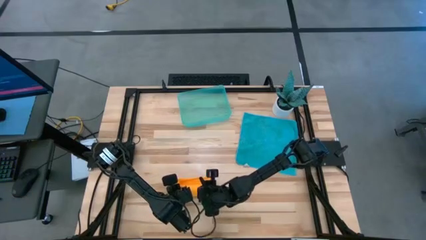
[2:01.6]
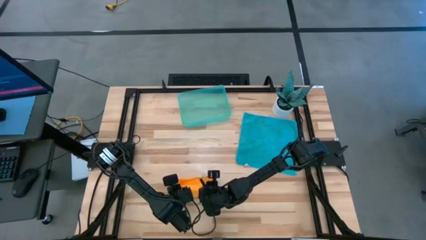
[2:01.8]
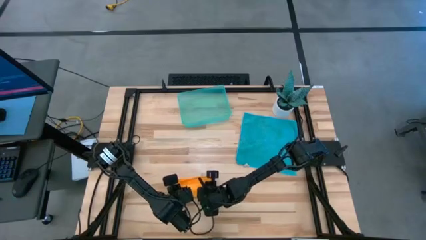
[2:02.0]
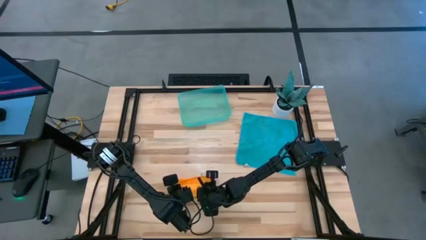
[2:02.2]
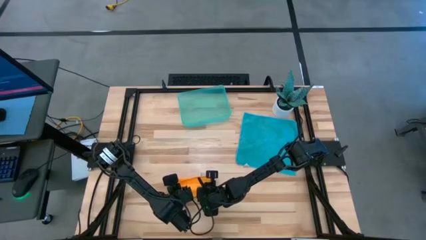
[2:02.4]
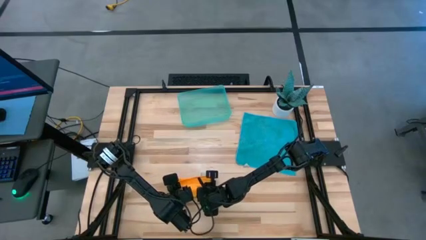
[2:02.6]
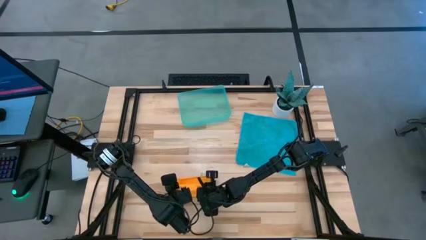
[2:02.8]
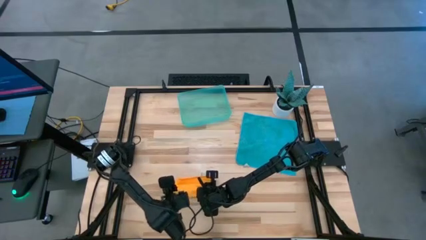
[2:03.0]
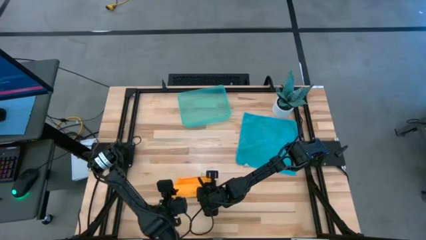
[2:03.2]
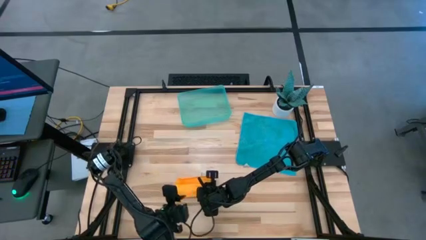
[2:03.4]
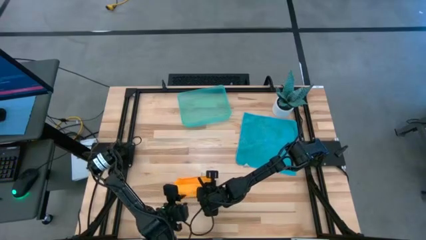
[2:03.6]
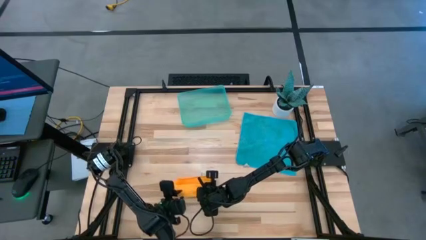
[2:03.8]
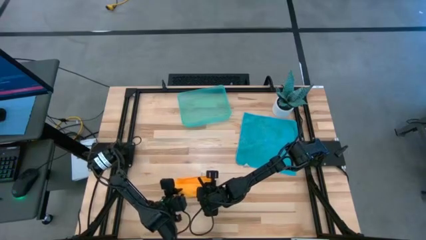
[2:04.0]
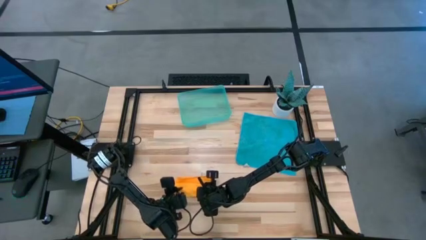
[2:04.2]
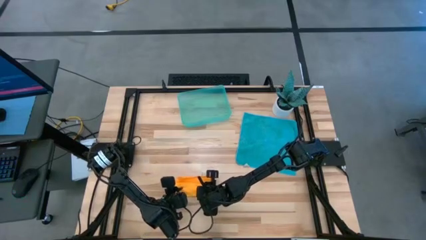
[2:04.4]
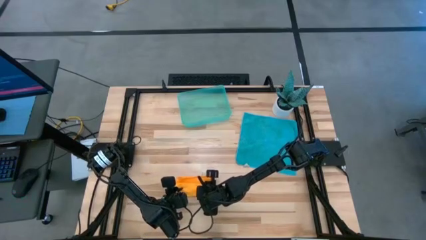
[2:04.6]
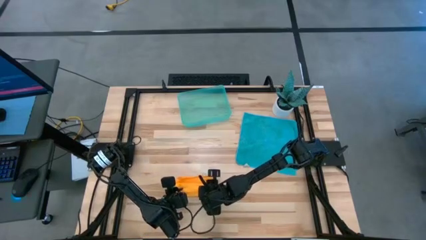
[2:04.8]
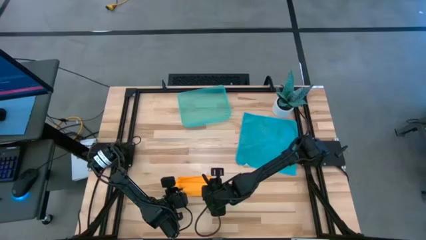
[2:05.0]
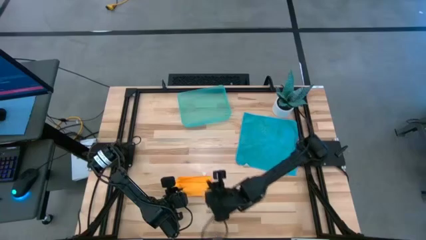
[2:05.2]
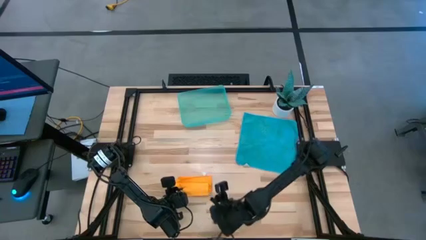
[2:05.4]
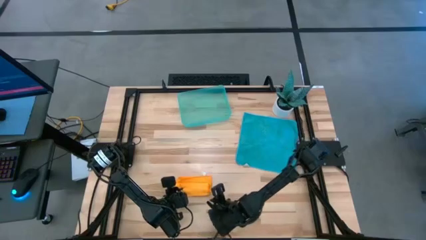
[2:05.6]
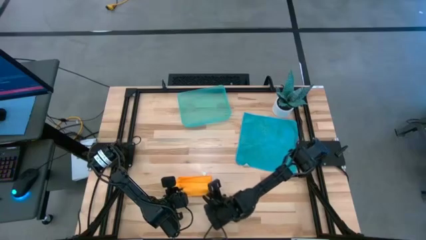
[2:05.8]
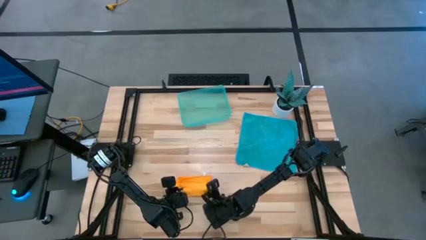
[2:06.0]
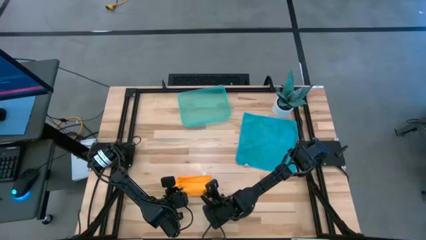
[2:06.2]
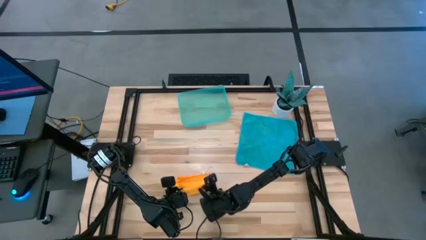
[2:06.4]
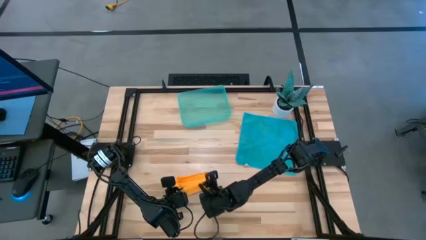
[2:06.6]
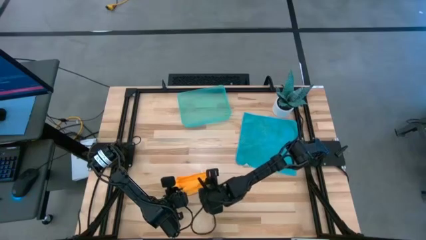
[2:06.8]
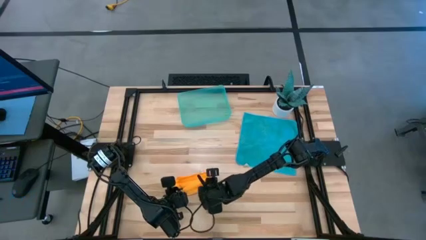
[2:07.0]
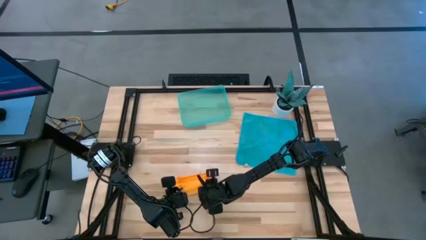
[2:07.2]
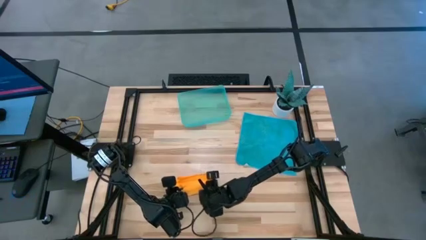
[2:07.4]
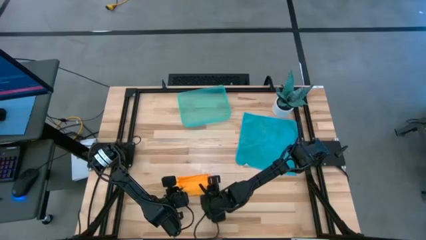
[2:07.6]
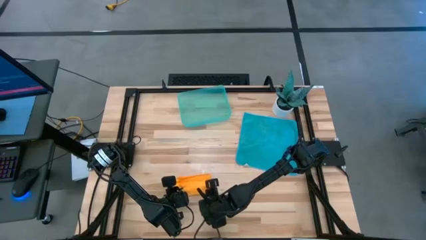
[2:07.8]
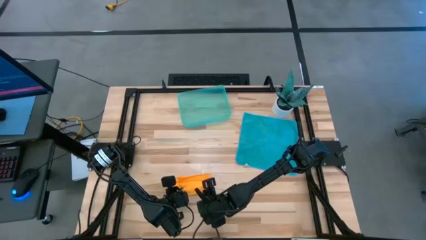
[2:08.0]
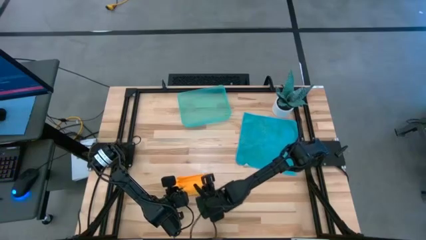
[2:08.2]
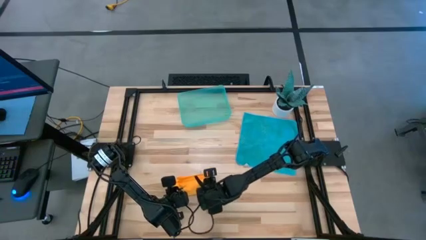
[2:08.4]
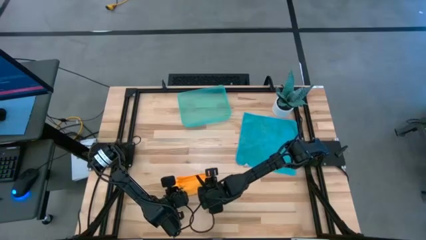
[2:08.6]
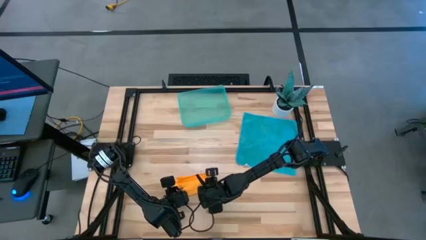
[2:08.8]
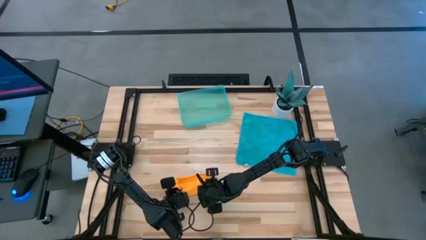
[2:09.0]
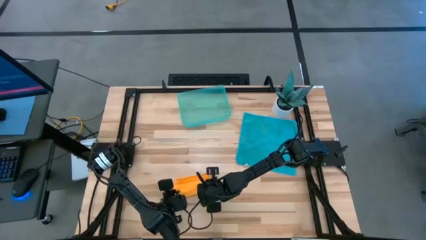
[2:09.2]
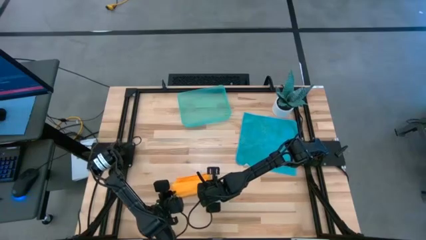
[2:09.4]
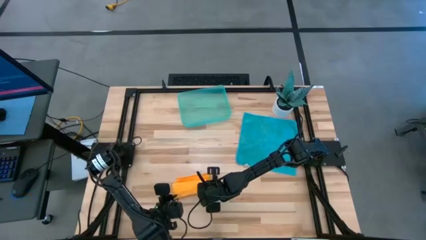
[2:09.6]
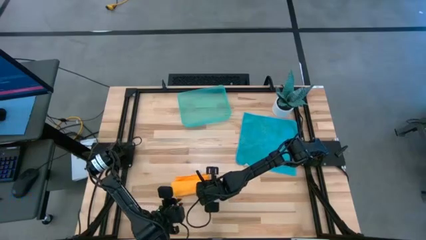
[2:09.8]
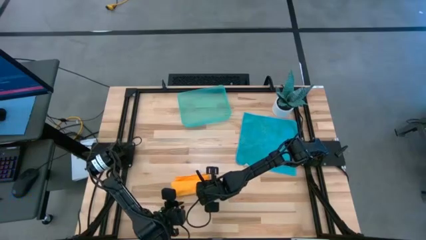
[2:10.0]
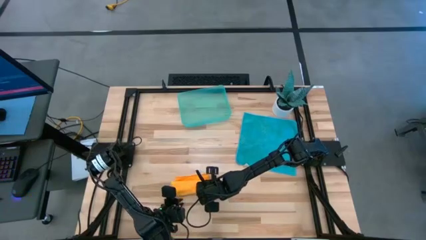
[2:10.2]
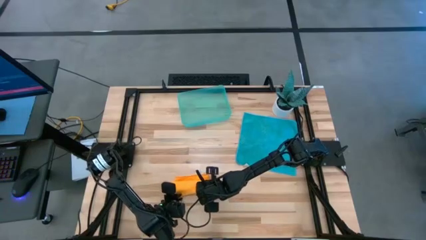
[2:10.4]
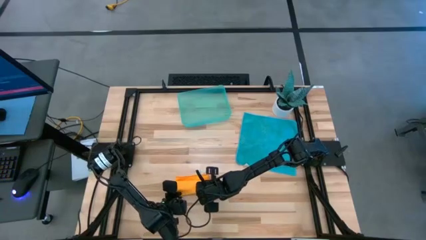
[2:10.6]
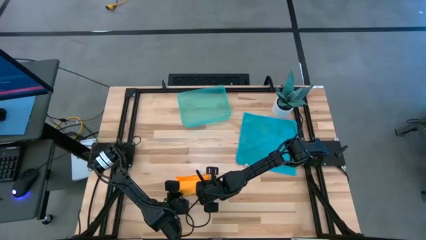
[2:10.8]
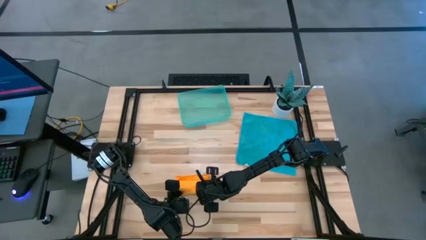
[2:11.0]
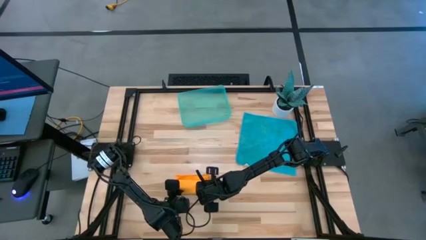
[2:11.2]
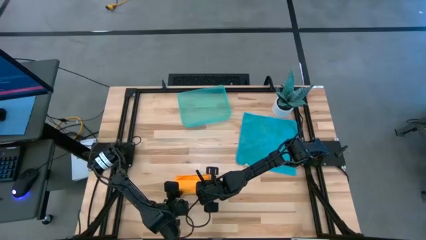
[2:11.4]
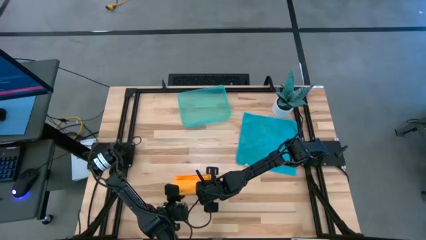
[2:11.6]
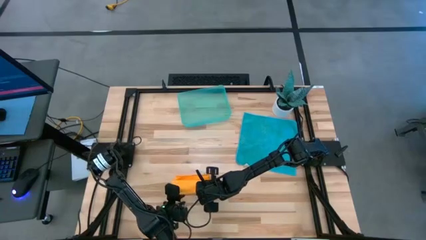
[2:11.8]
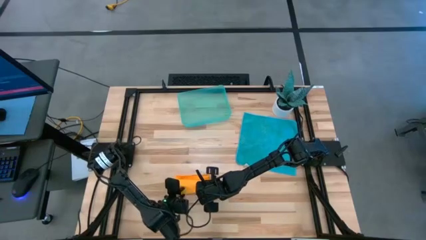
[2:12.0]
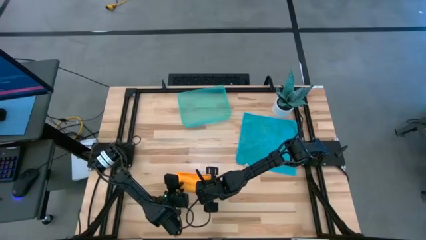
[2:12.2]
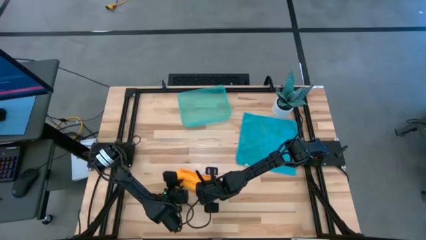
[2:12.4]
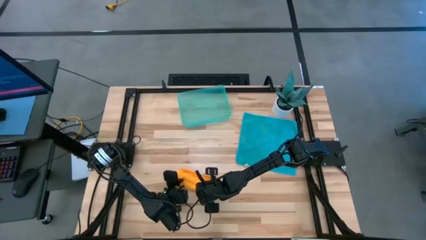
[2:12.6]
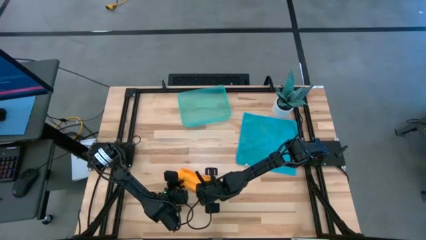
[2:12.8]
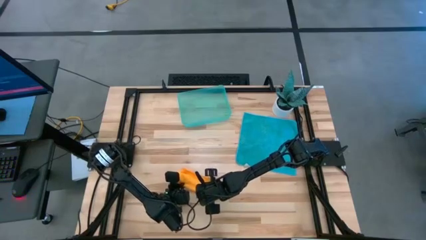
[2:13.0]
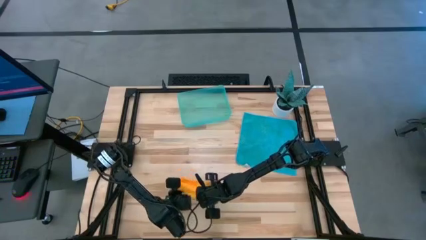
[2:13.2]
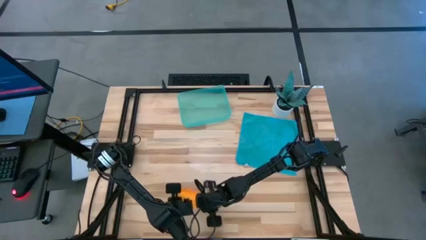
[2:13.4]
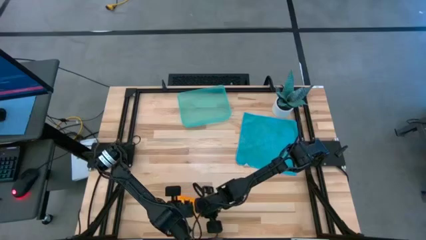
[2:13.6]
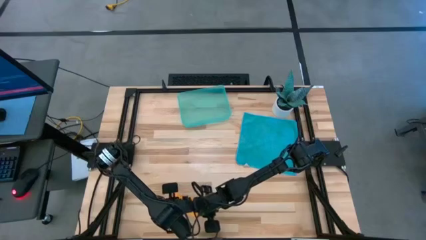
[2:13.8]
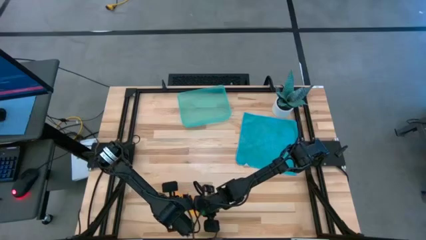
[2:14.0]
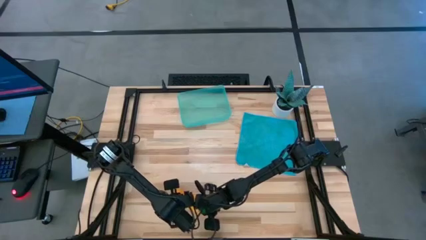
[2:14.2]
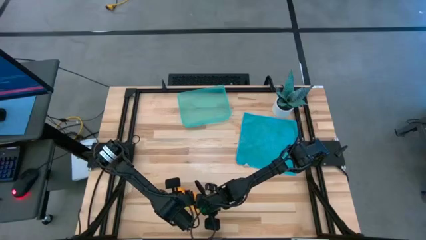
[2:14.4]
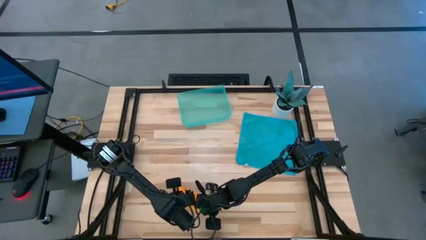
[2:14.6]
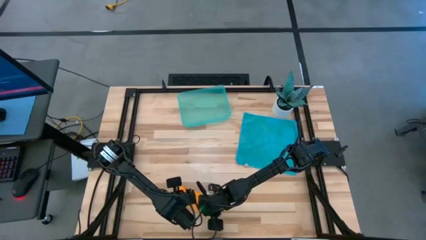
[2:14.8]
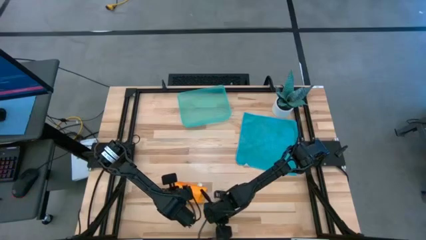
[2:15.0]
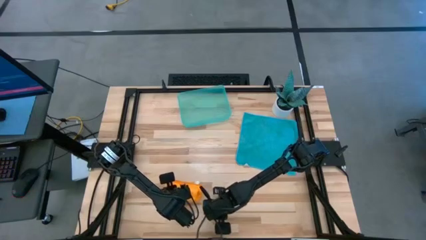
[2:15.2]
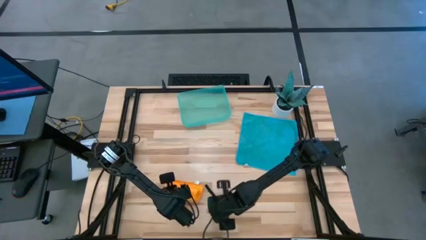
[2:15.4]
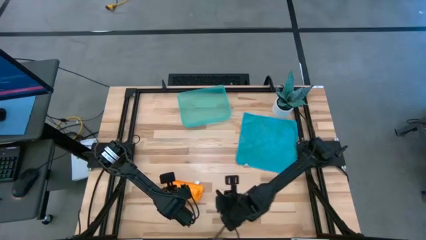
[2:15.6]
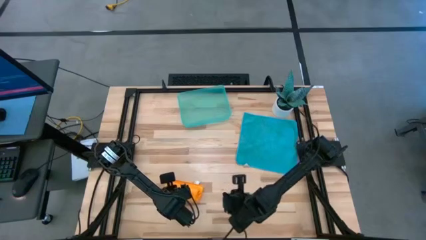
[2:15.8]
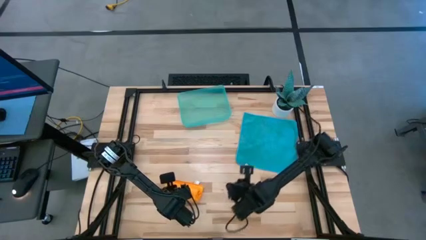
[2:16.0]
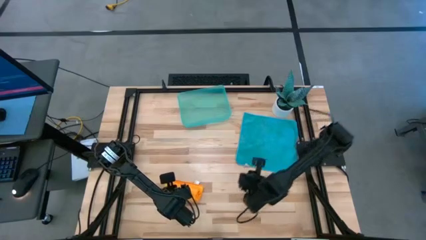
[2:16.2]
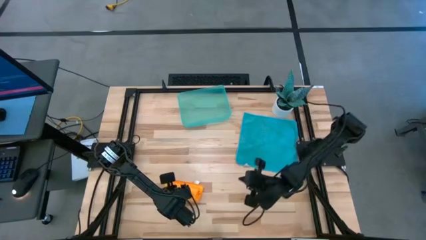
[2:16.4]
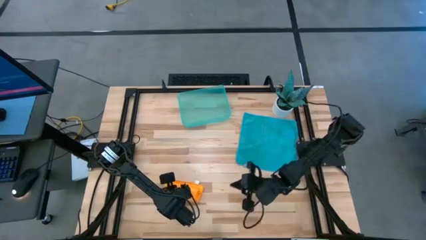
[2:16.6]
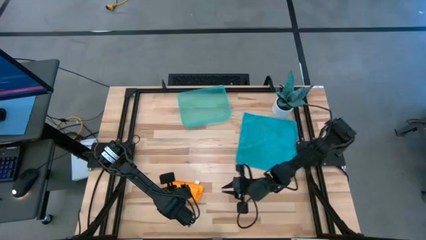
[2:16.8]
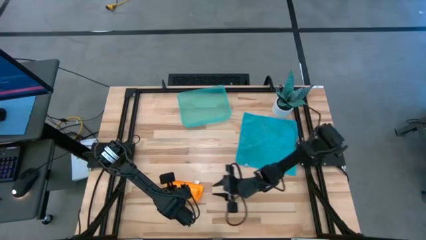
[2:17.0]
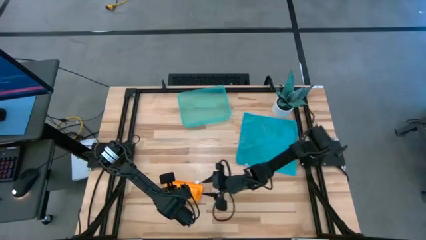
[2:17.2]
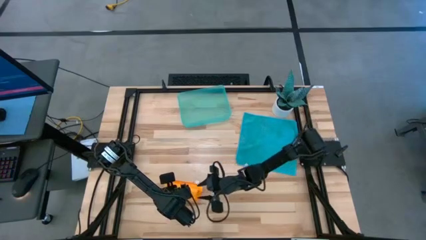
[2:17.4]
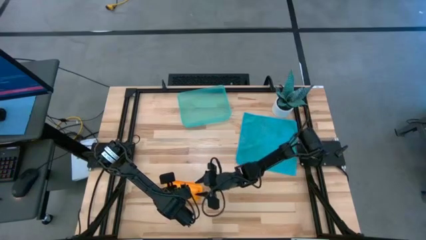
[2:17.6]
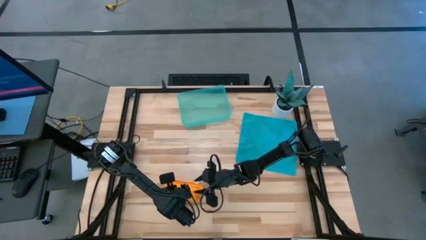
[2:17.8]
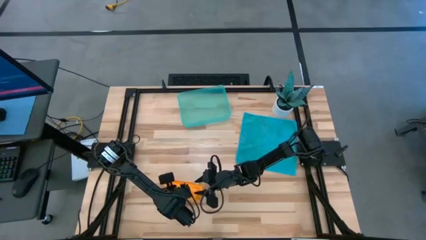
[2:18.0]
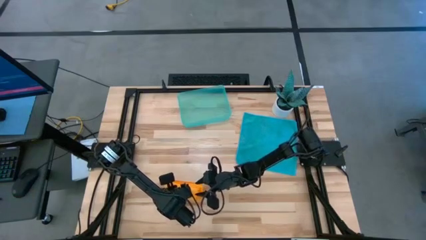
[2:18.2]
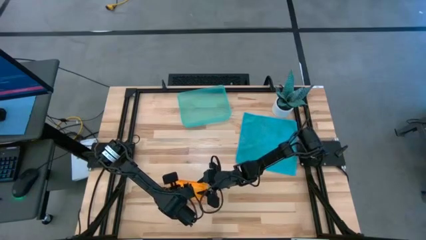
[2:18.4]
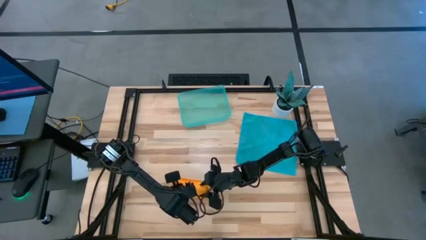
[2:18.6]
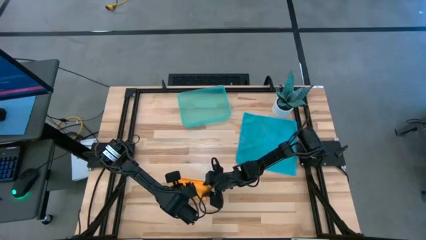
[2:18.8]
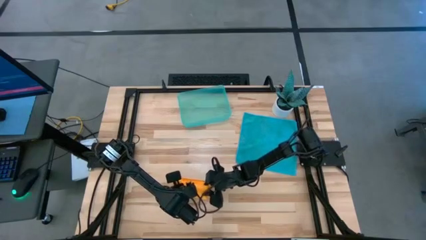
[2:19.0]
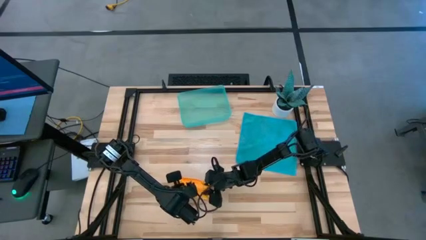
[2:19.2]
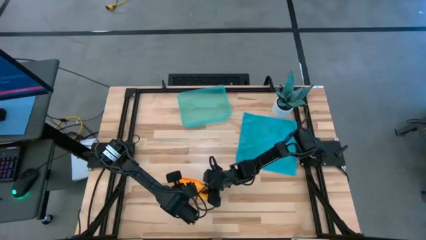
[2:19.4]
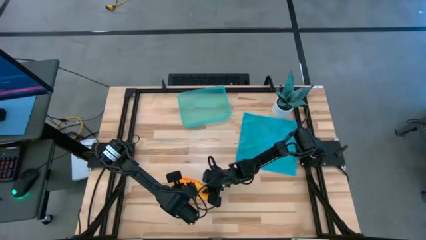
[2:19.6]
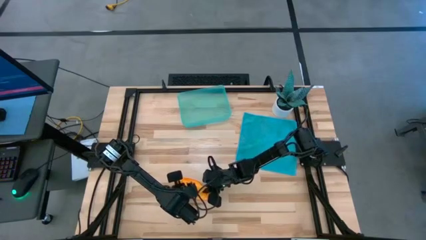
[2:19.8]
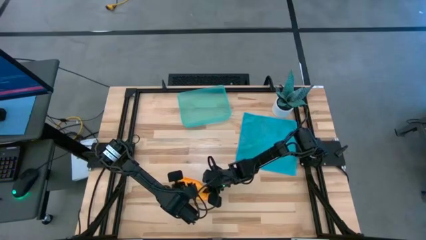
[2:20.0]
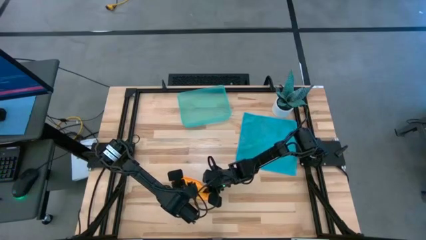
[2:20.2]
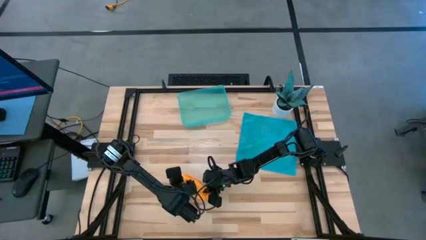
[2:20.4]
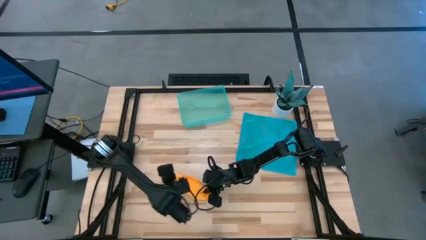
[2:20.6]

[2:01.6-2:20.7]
Task: Roll microfiber towels into tight, uniform cylinder then place into a basket
Roll the yellow microfiber towel
